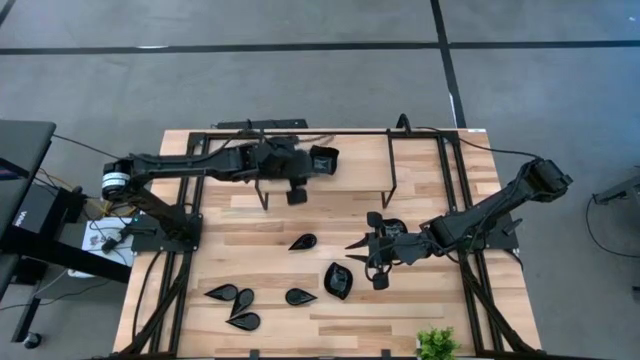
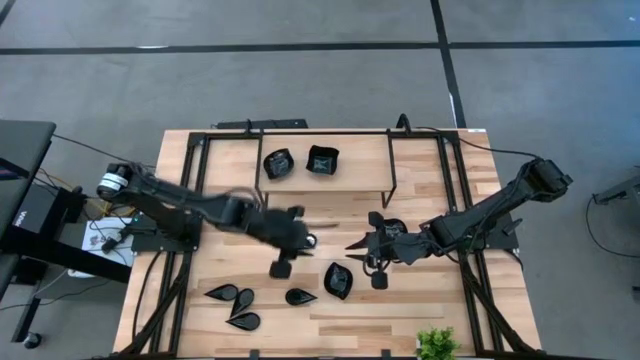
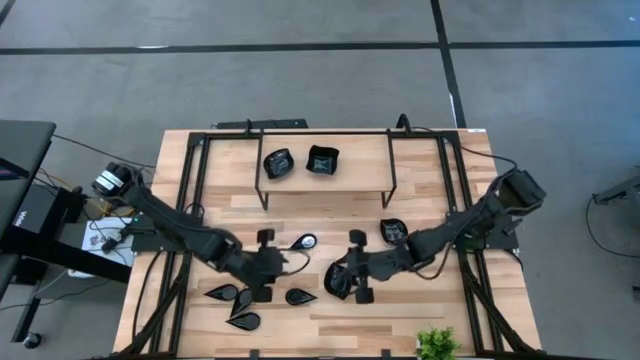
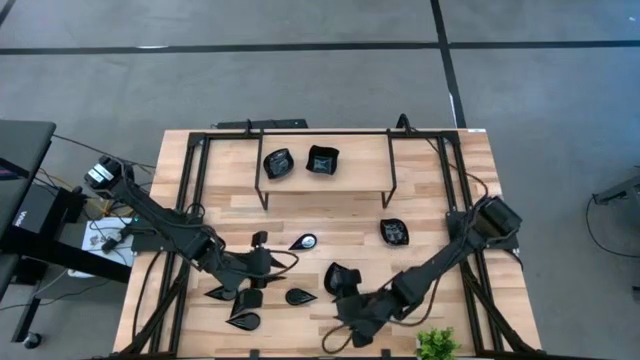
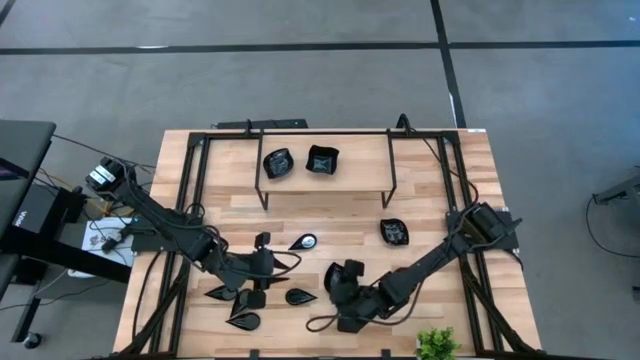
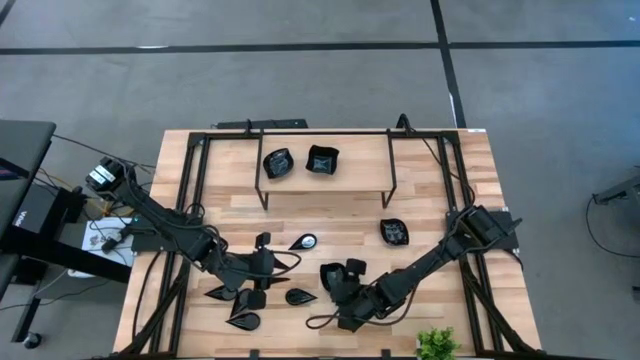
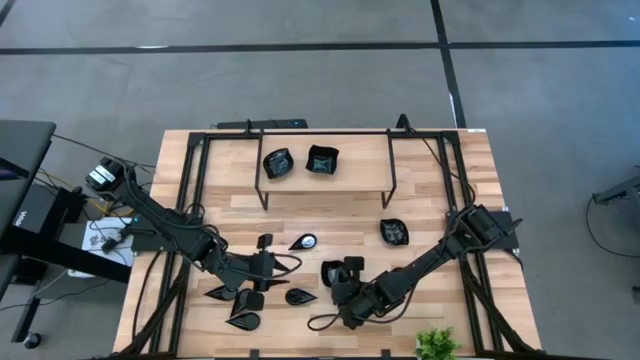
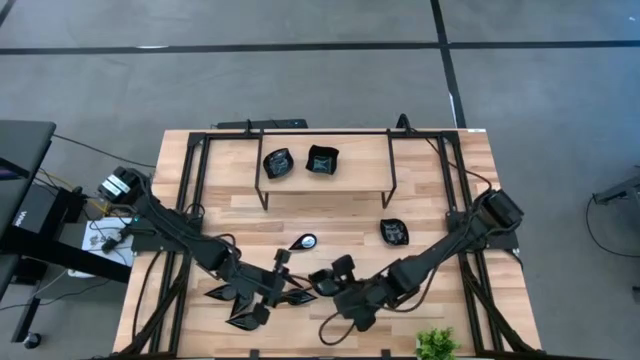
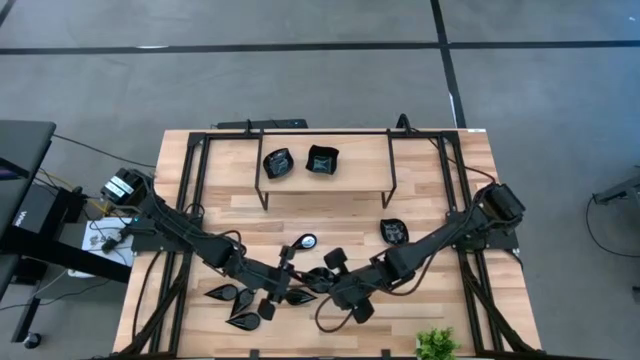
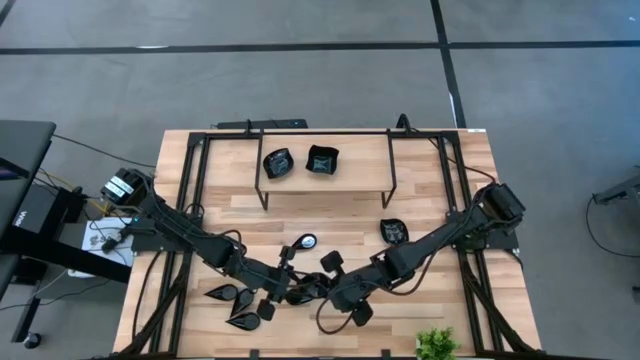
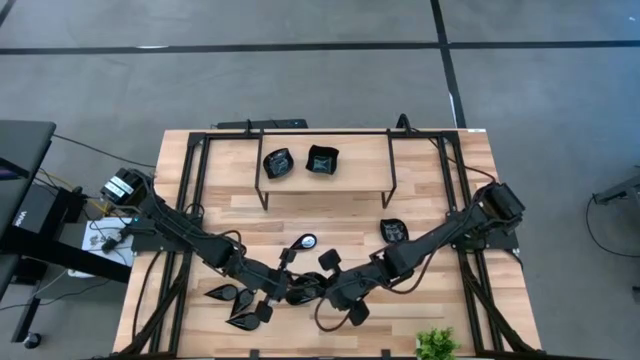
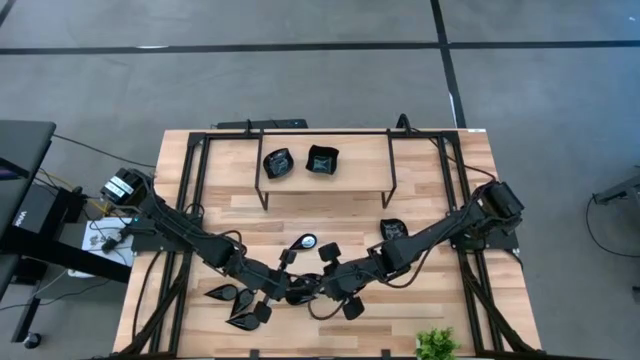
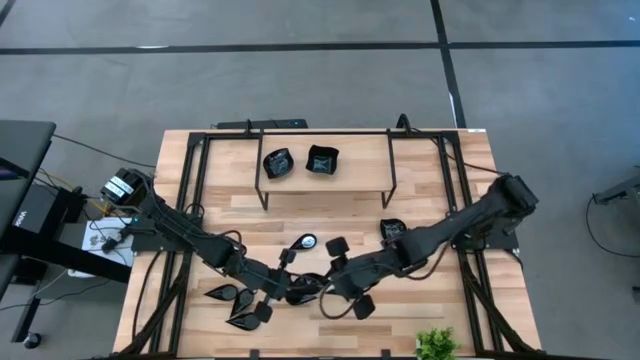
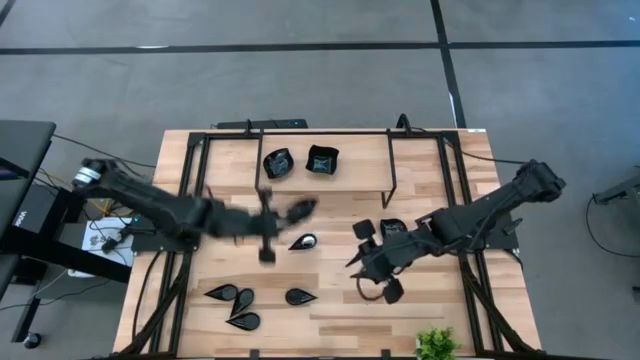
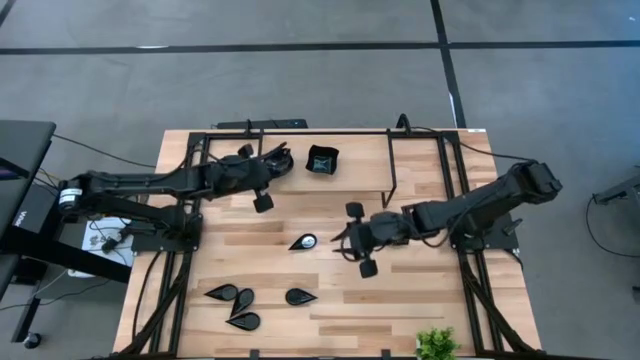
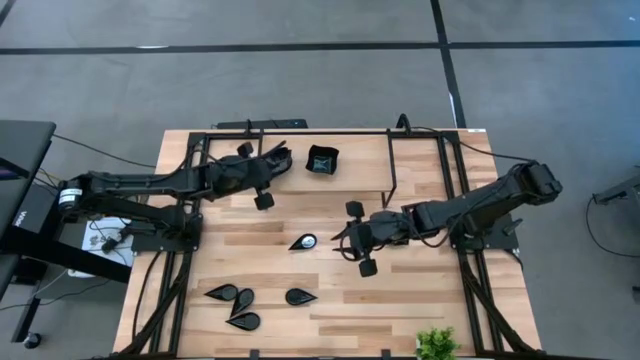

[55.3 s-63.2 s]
Task: Pick & Place Mini shaped plates
Stack the black leaf-shaped plate on top of the black leaf-shaped plate on the shelf

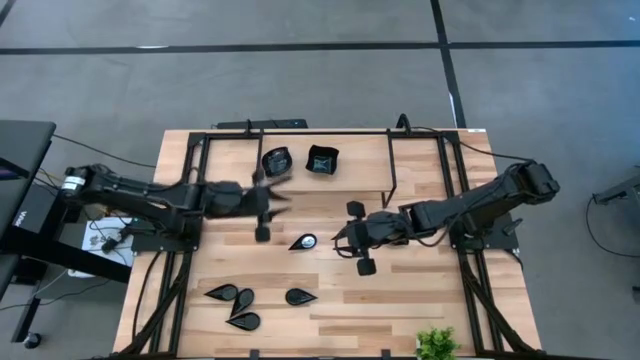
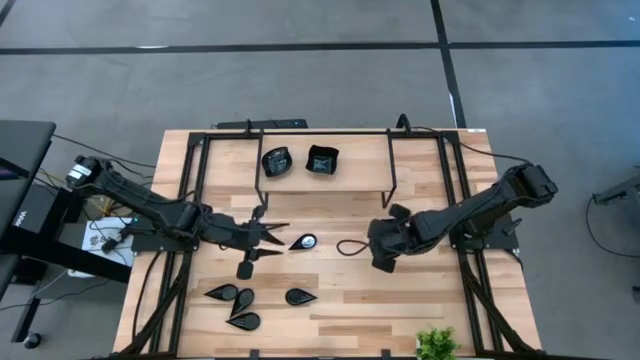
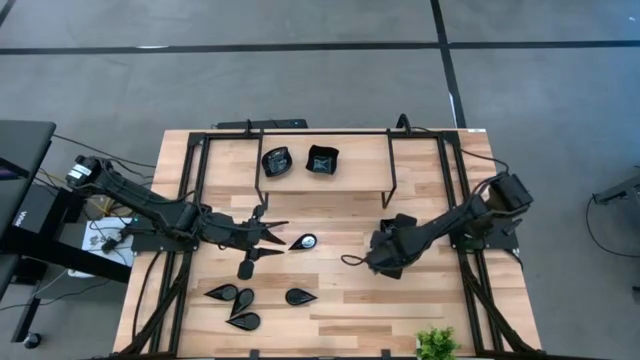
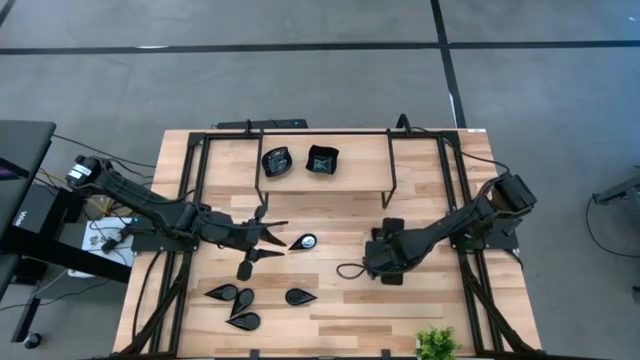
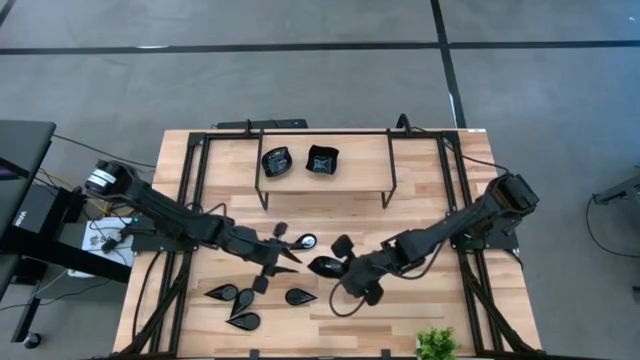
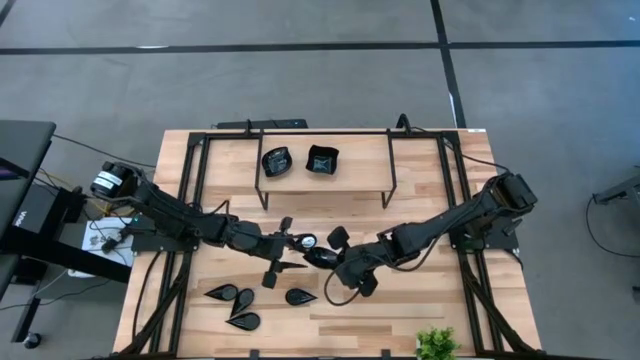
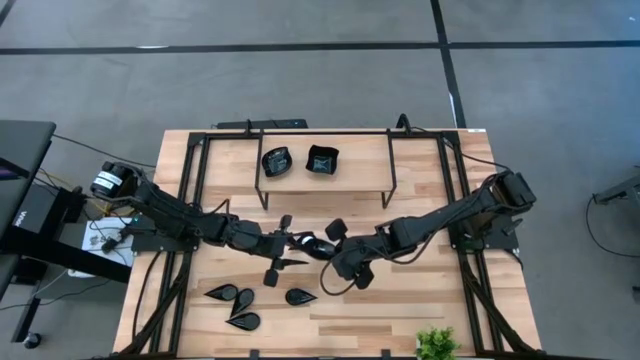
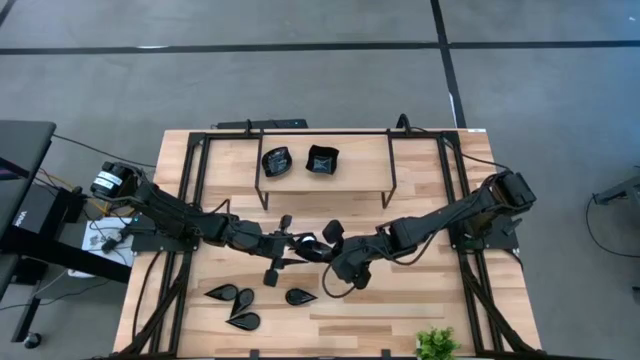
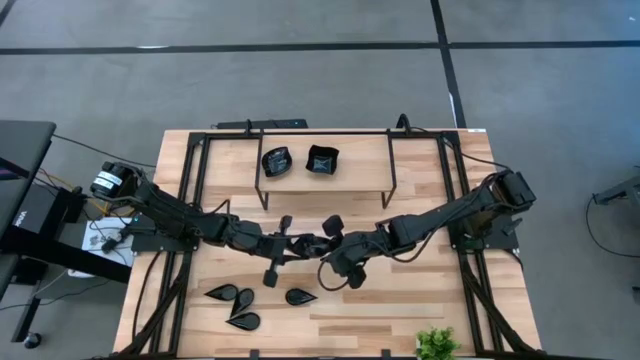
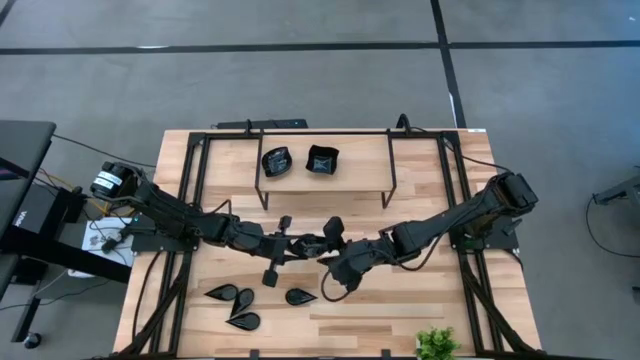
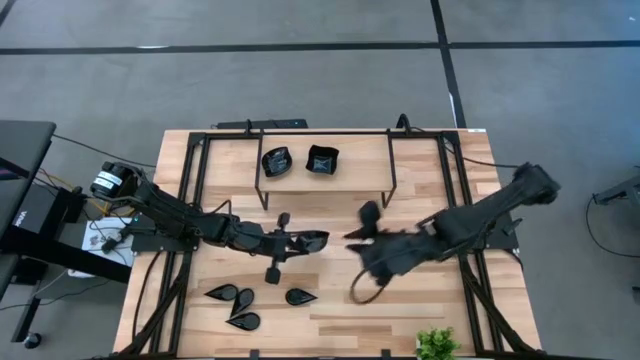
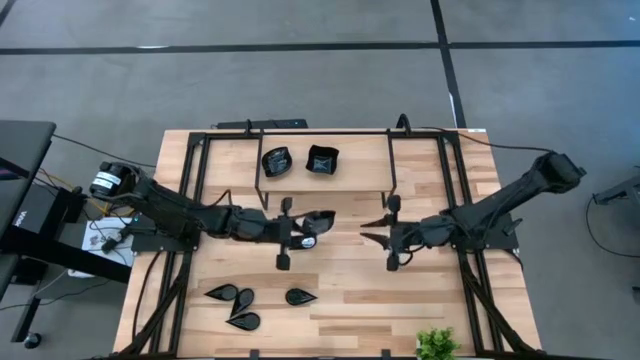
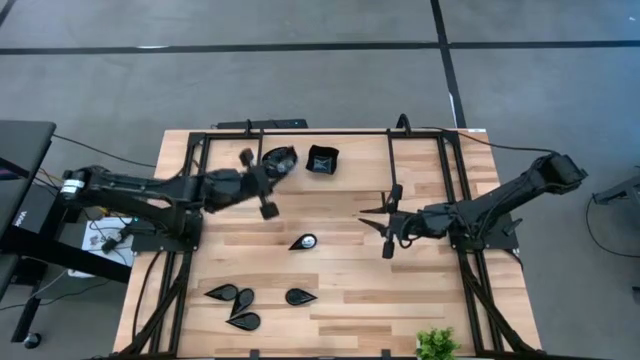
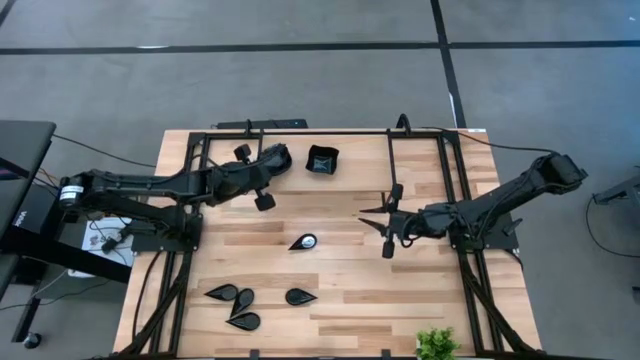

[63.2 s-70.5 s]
Stack the black leaf-shaped plate on top of the black leaf-shaped plate on the shelf

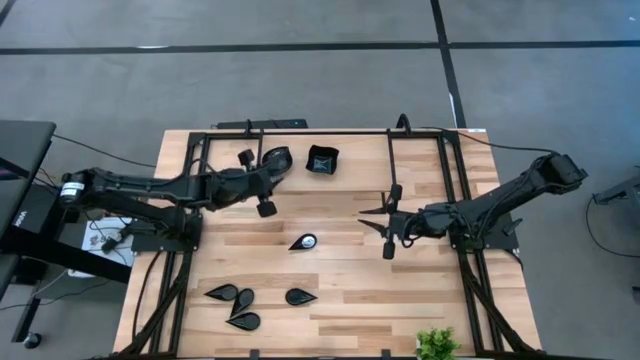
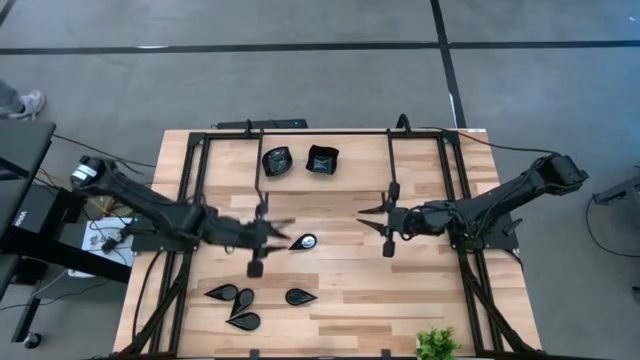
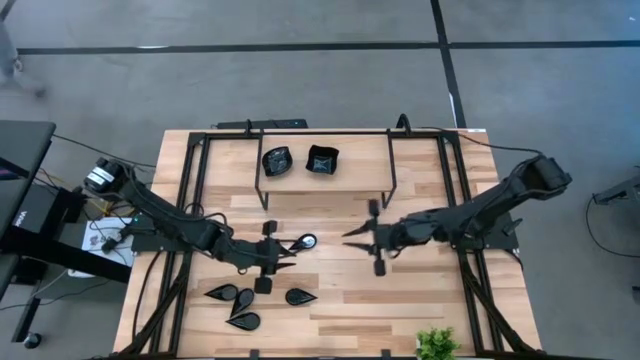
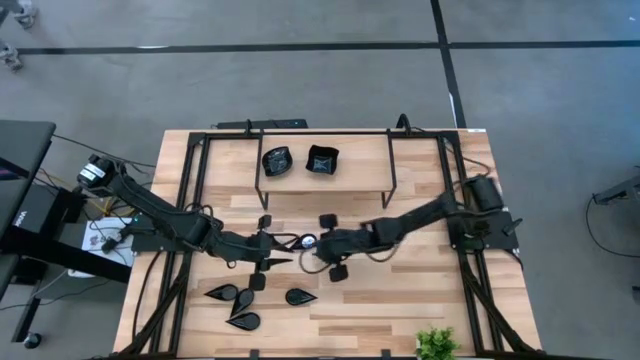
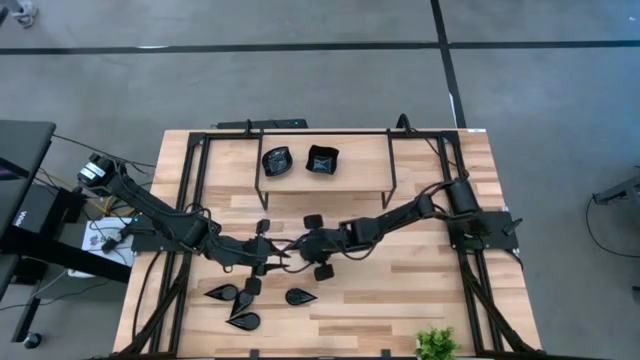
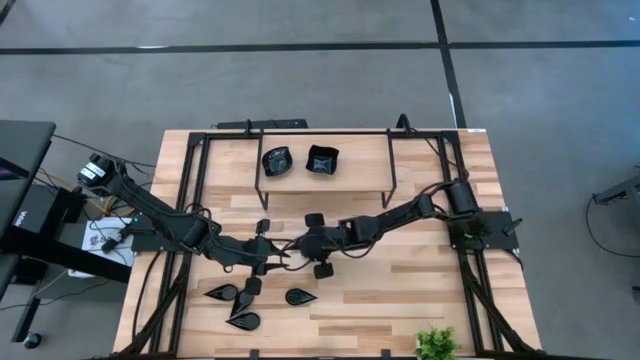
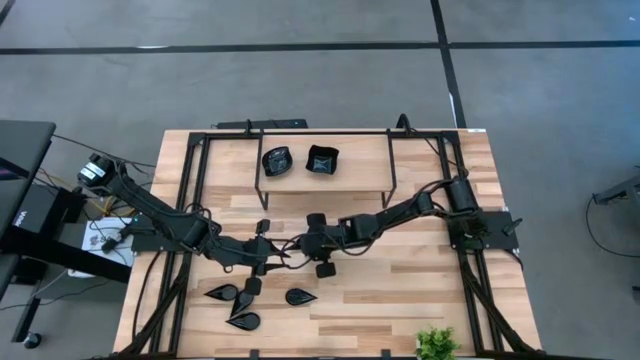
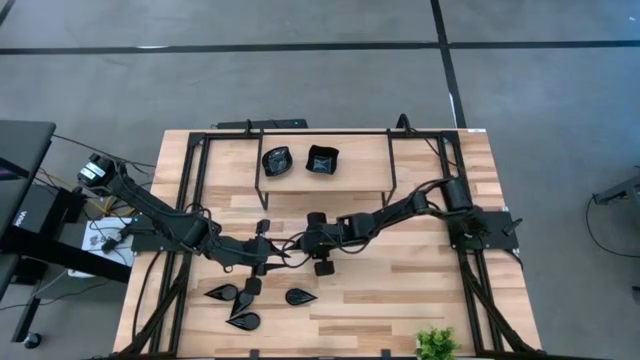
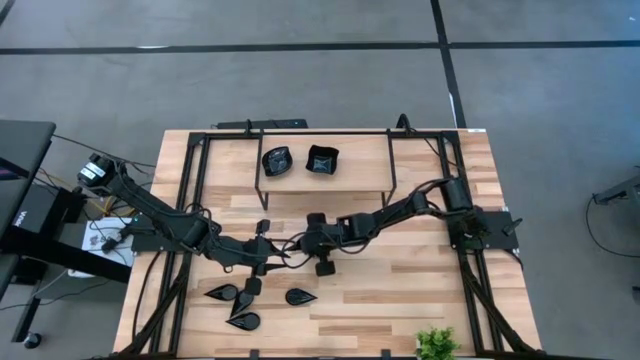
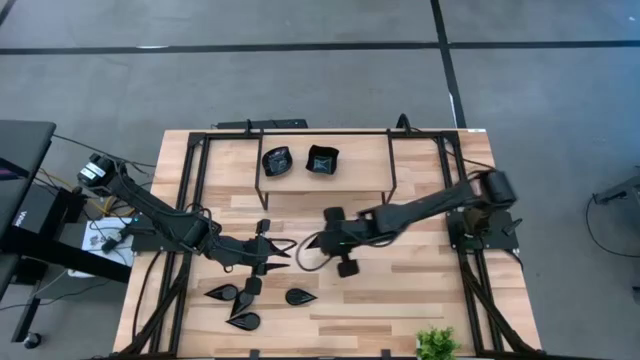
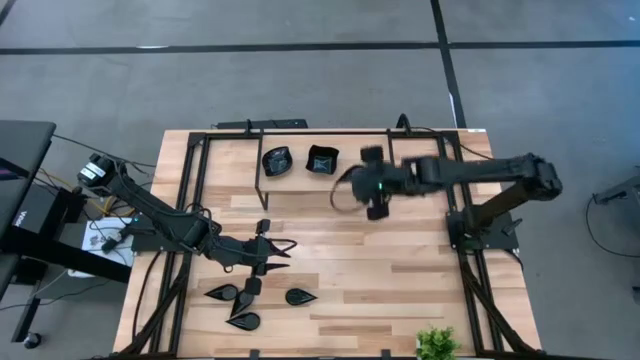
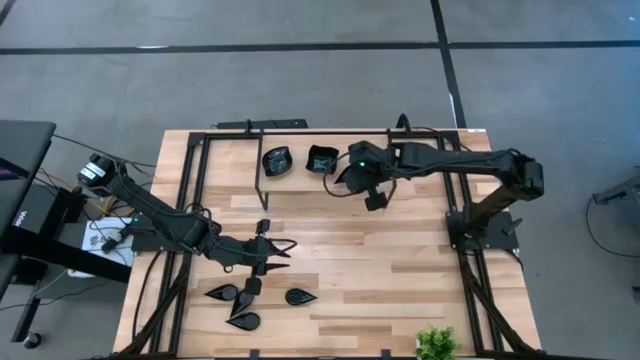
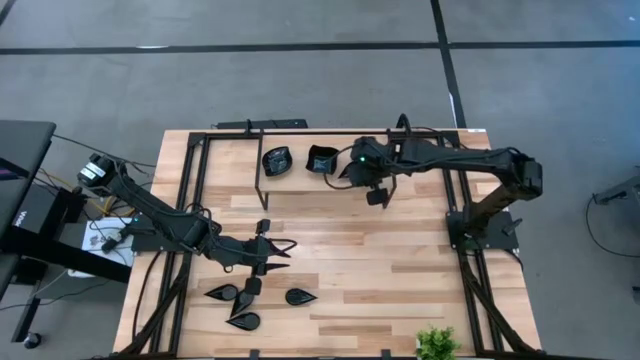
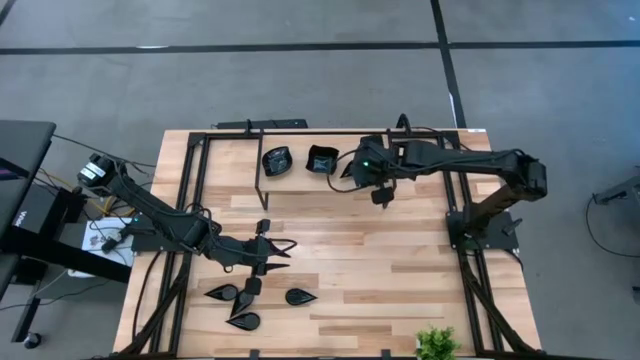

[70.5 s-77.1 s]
Put the black drop-shaped plate on the shelf
